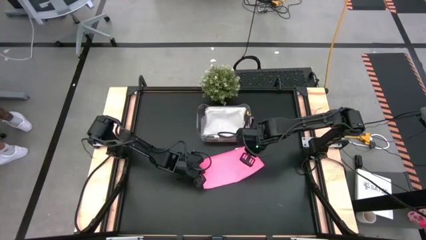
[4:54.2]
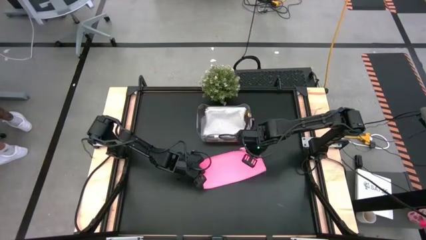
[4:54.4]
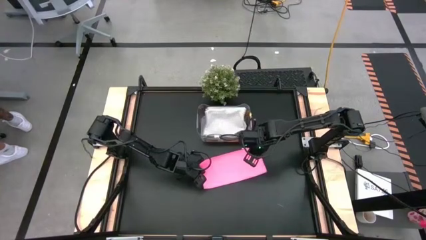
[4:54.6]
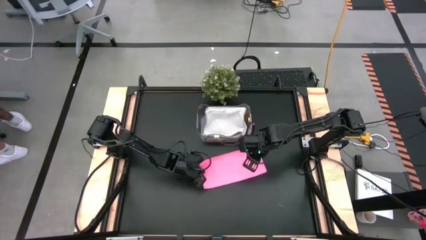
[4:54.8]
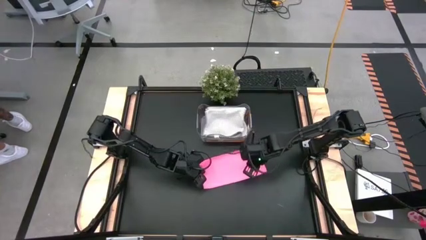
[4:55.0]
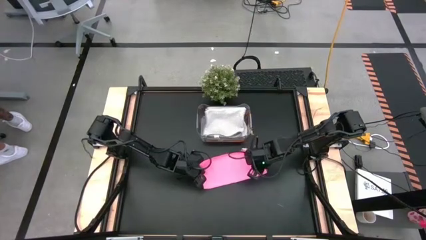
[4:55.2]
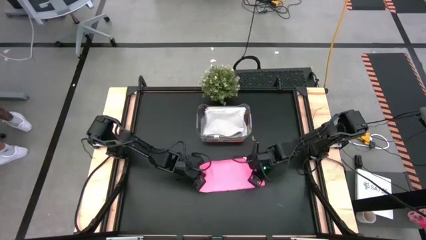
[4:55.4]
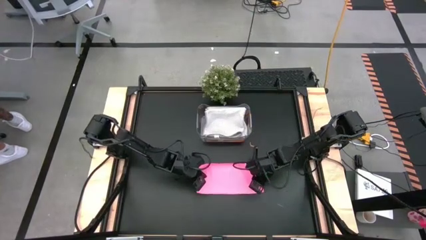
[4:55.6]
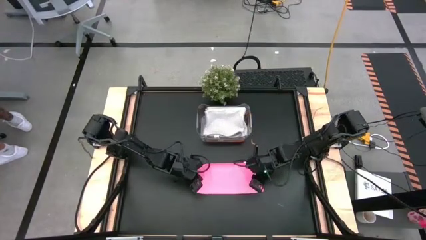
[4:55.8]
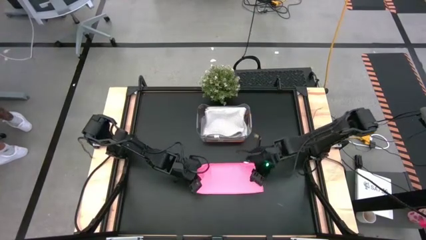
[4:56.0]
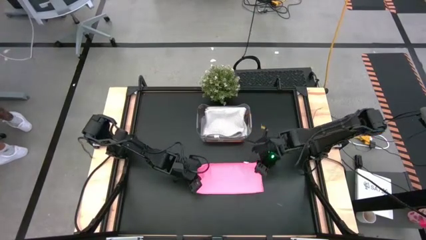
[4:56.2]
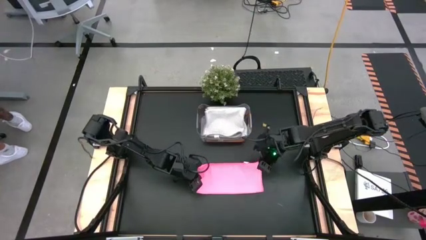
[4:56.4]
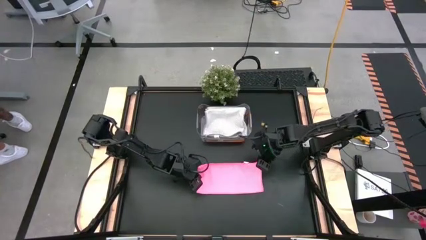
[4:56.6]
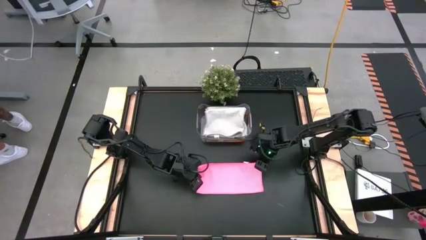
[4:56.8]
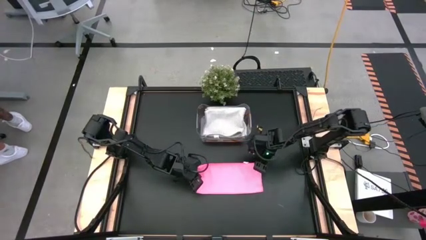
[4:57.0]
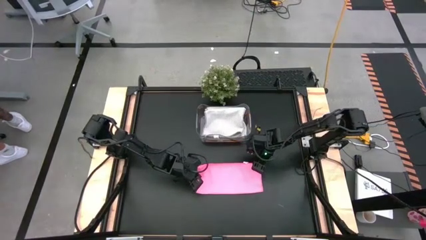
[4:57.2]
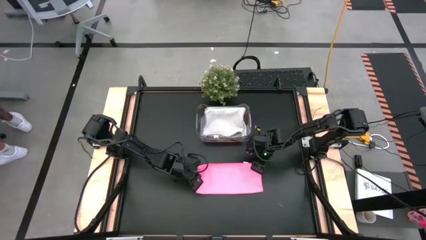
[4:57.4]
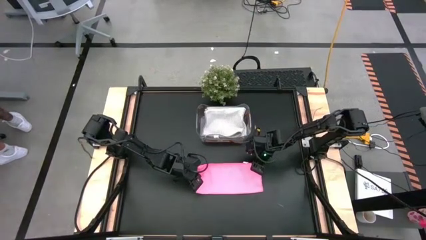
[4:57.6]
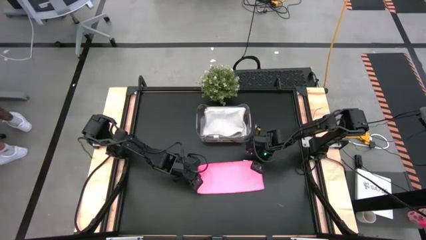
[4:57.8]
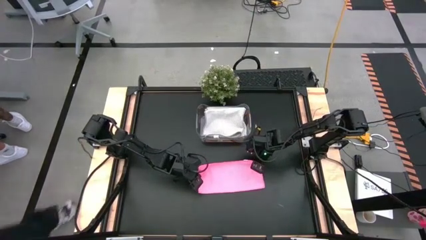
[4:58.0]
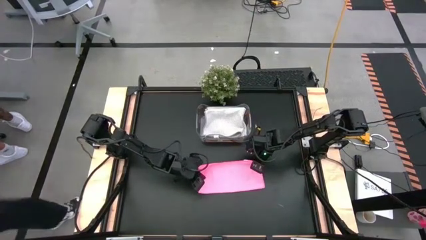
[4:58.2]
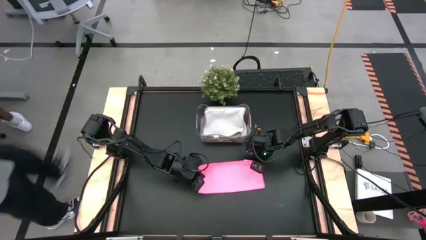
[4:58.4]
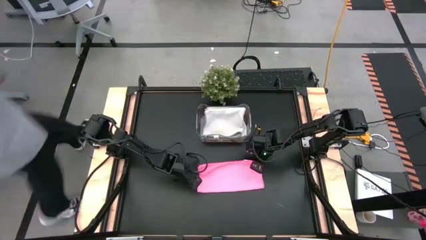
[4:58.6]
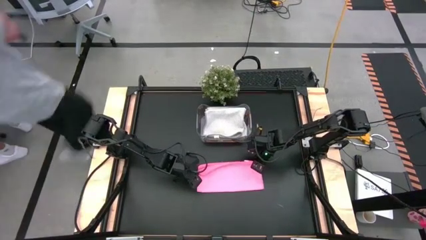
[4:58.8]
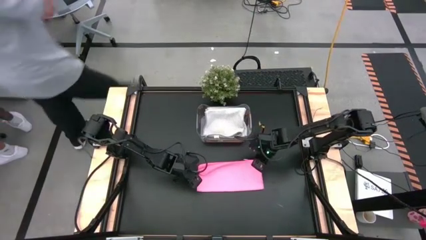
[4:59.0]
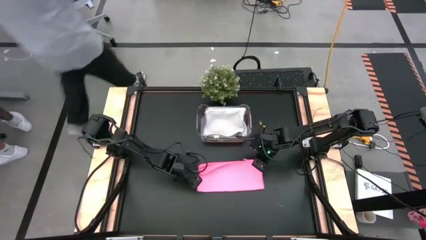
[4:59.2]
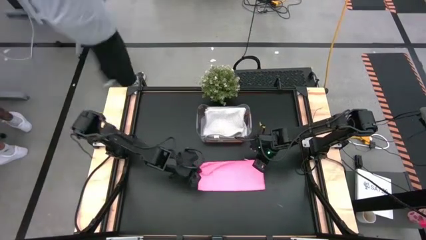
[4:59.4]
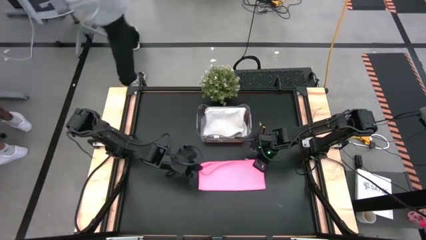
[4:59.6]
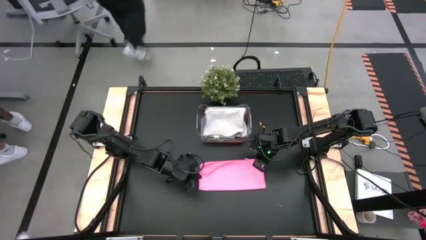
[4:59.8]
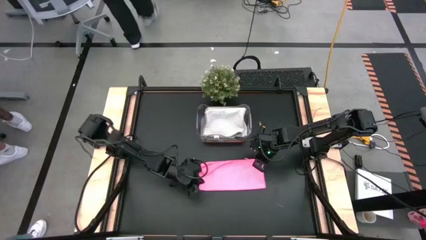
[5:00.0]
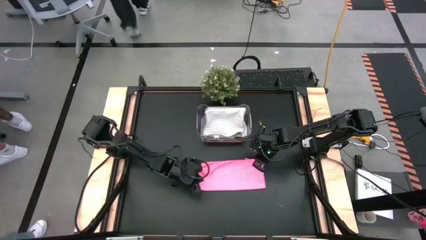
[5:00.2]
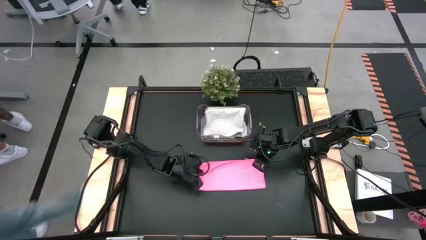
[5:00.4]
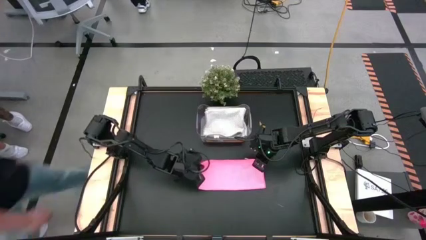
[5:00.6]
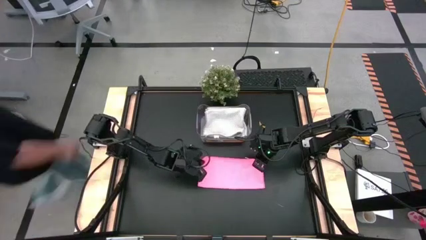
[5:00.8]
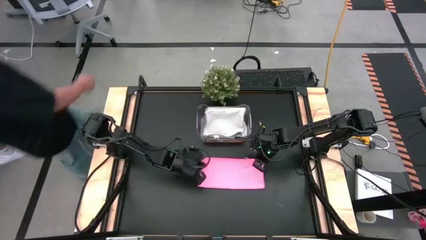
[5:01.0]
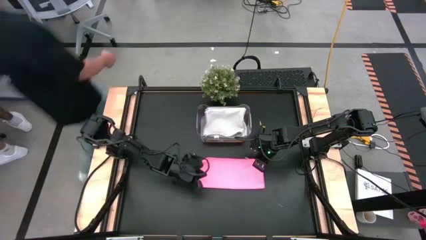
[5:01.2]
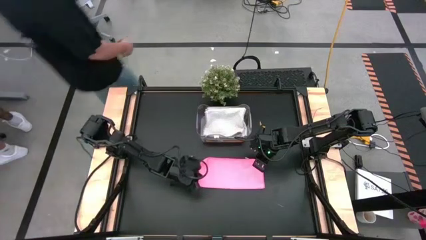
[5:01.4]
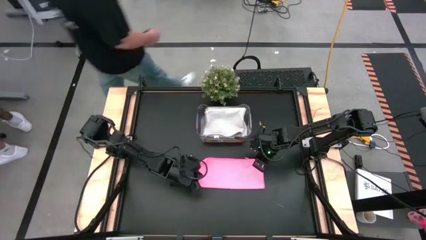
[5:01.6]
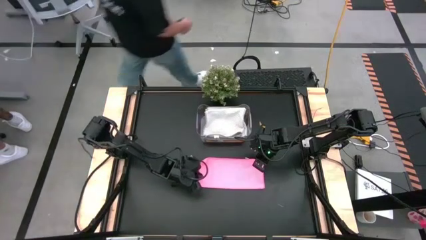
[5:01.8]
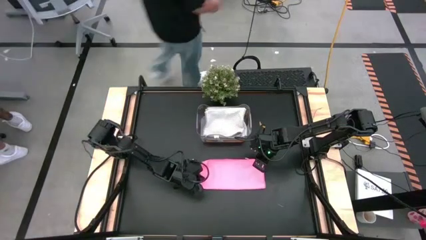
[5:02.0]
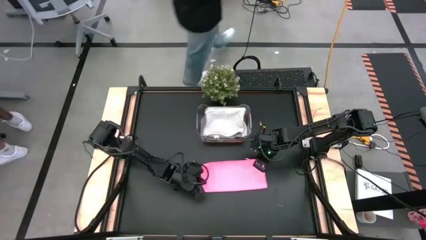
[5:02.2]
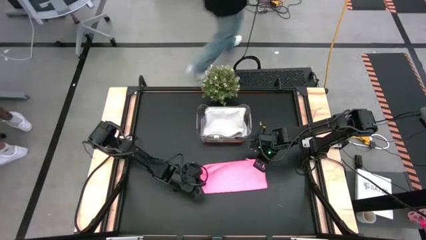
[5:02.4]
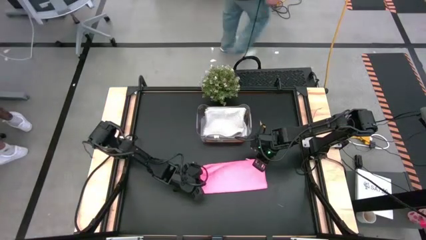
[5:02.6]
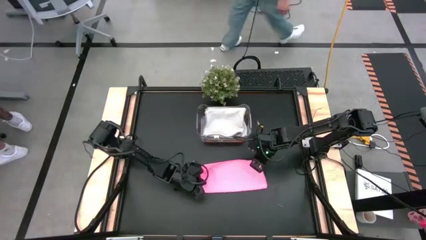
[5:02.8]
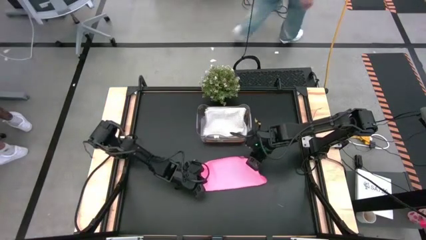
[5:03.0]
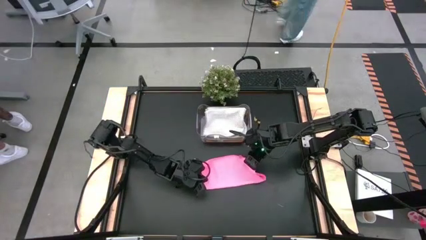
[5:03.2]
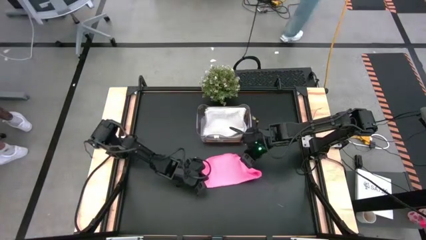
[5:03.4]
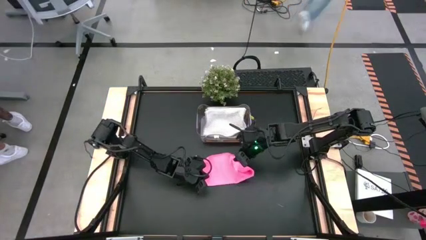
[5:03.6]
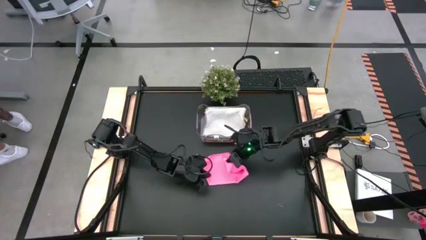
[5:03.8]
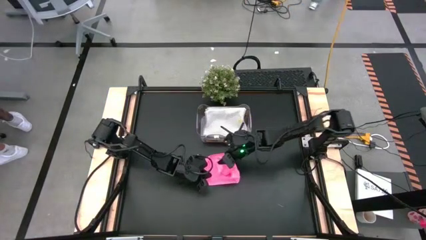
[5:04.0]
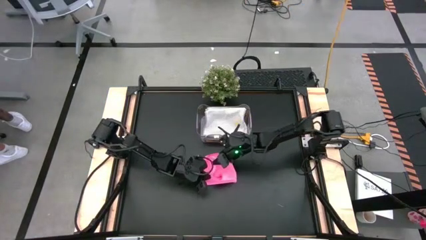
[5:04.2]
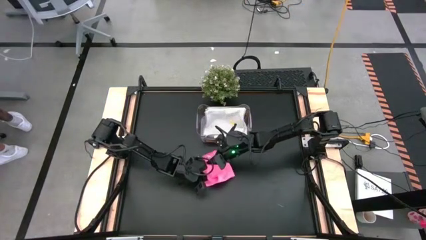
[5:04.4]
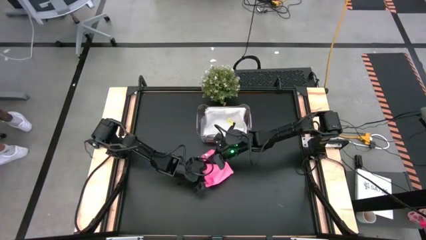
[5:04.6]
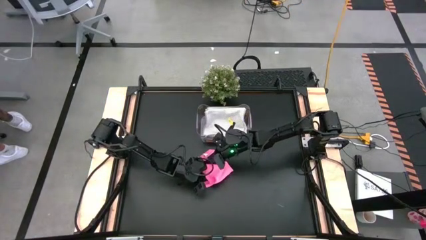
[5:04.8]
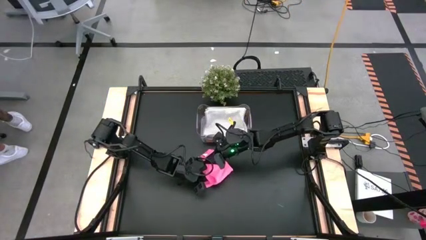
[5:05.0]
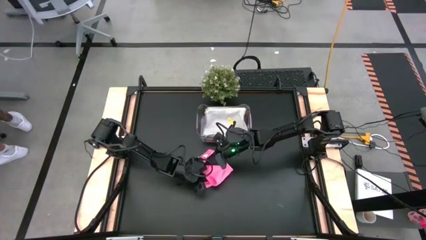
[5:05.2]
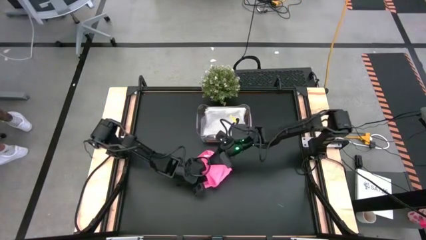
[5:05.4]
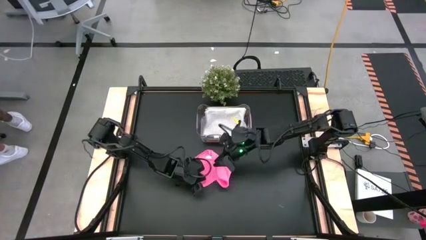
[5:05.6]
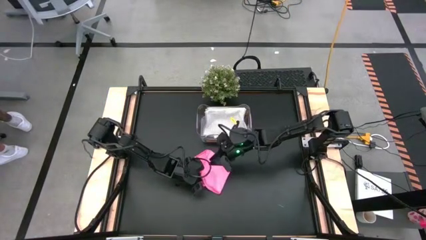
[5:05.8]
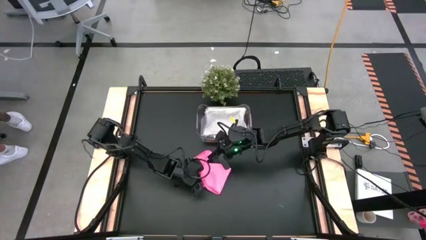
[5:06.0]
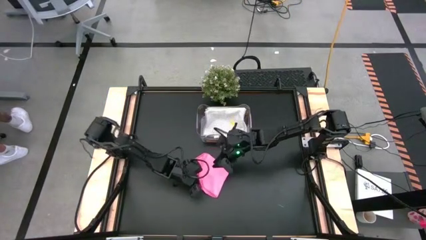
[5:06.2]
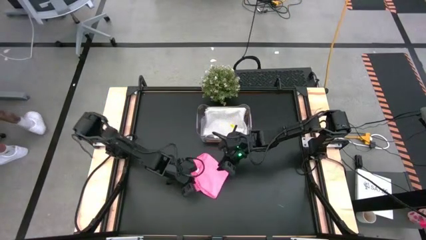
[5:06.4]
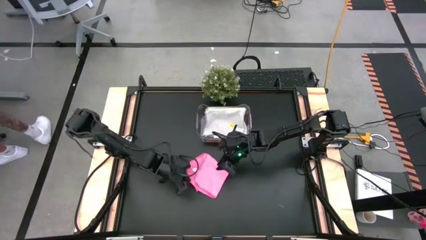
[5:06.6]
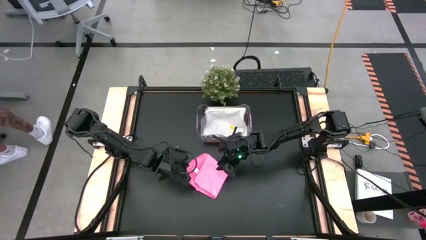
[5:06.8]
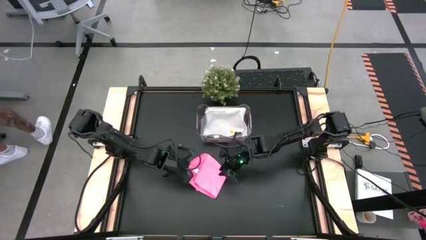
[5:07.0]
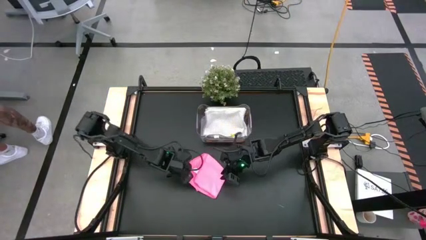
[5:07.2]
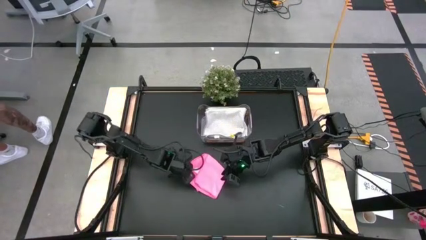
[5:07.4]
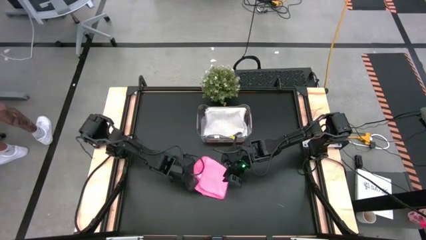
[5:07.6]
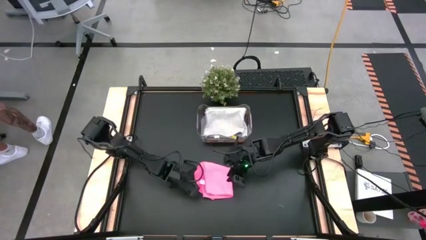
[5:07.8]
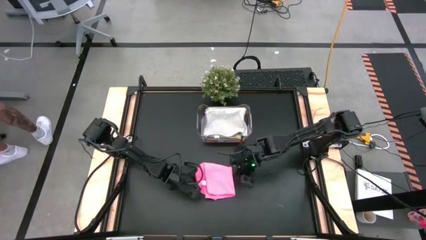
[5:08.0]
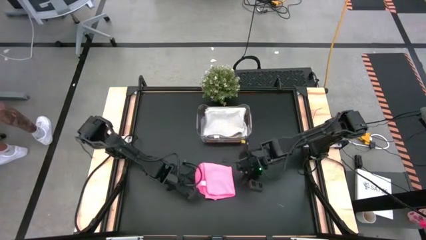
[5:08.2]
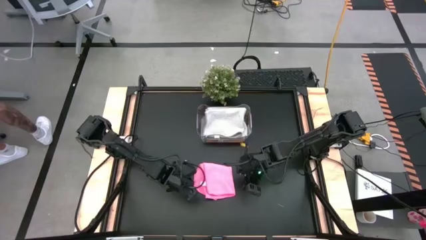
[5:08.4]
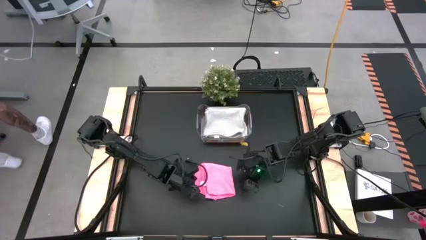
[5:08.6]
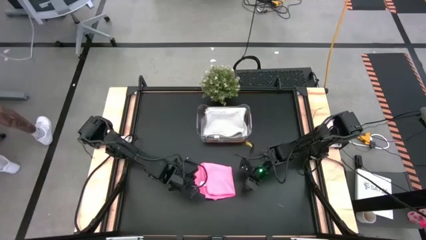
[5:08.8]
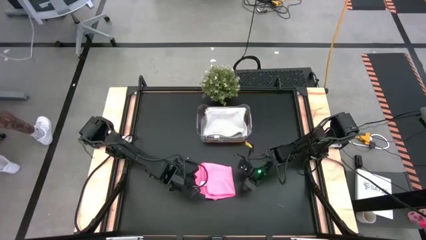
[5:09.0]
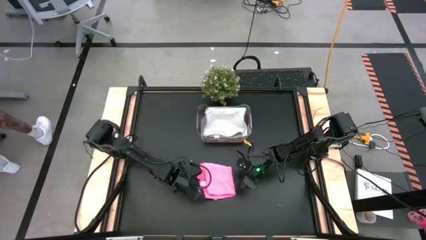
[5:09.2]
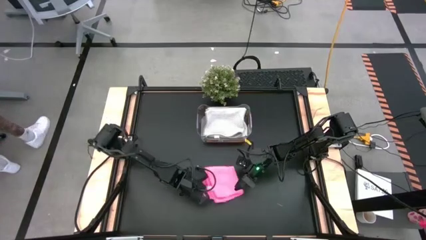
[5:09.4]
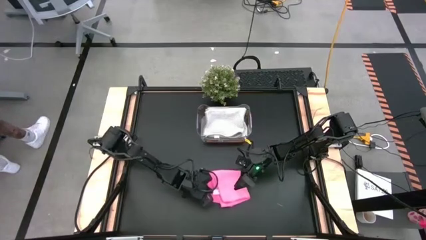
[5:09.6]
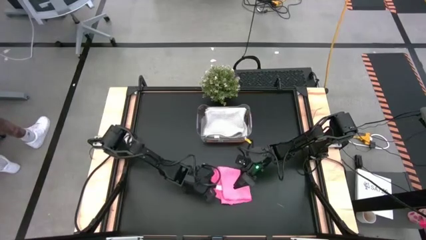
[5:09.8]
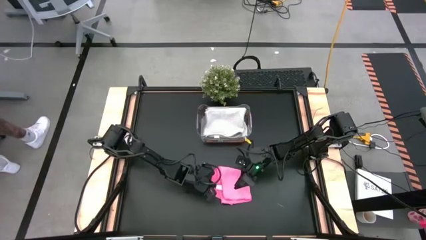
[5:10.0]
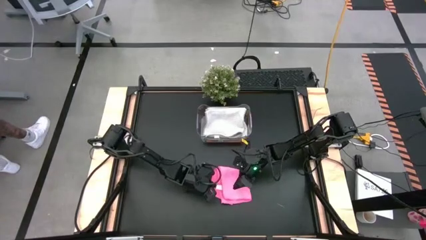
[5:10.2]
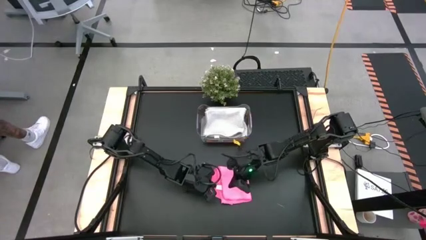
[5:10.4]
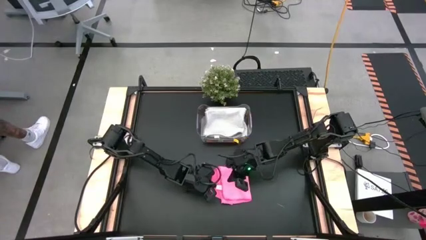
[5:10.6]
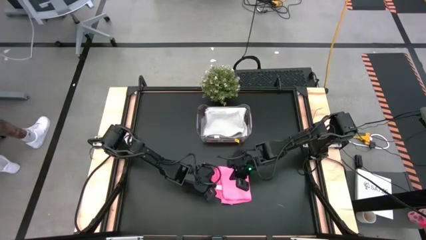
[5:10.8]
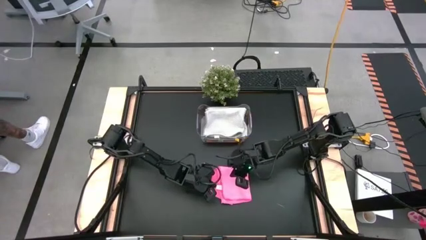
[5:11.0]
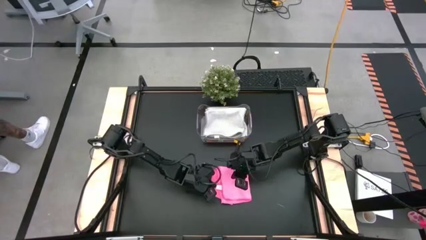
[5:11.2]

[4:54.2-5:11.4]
Task: Fold microfiber towels
Fold the pink microfiber towel
